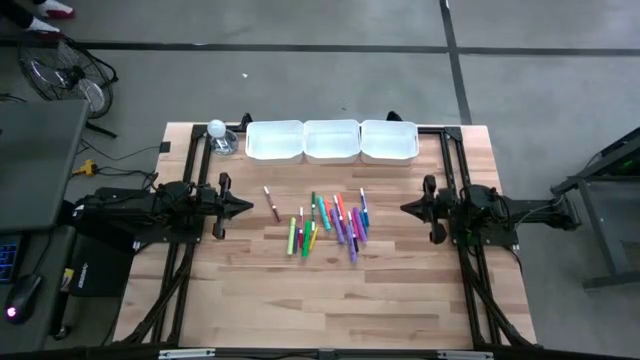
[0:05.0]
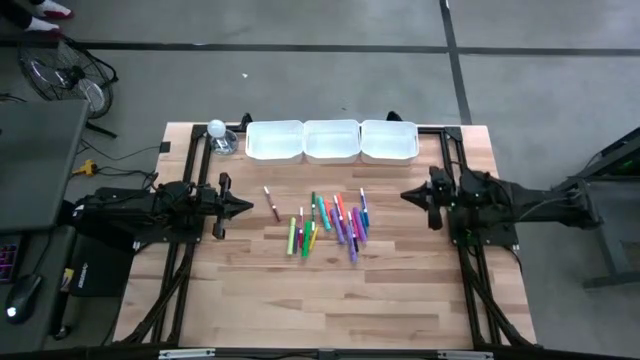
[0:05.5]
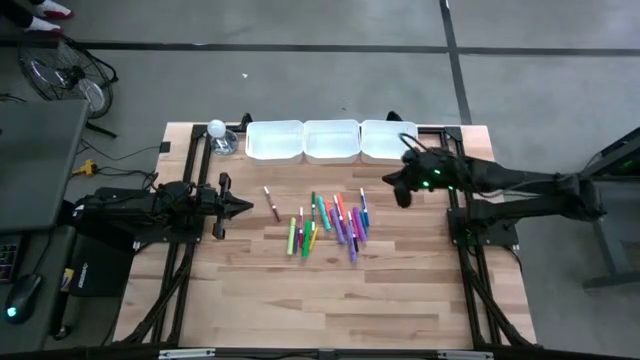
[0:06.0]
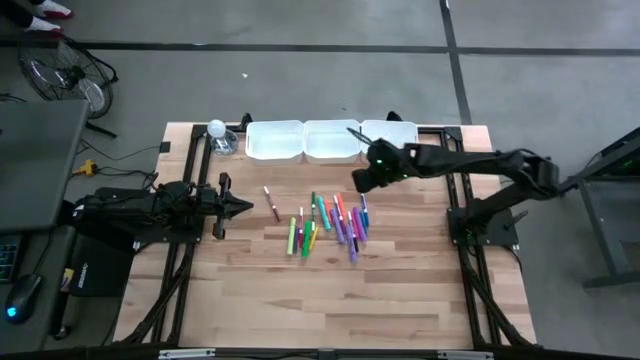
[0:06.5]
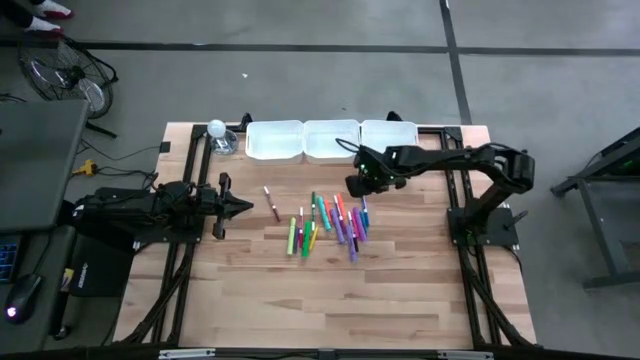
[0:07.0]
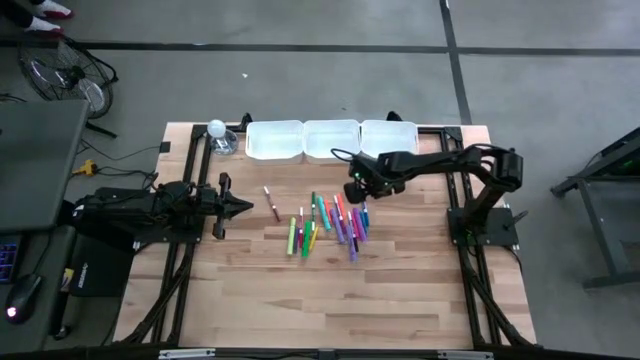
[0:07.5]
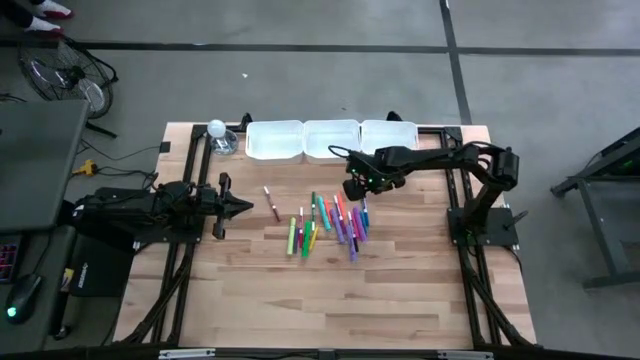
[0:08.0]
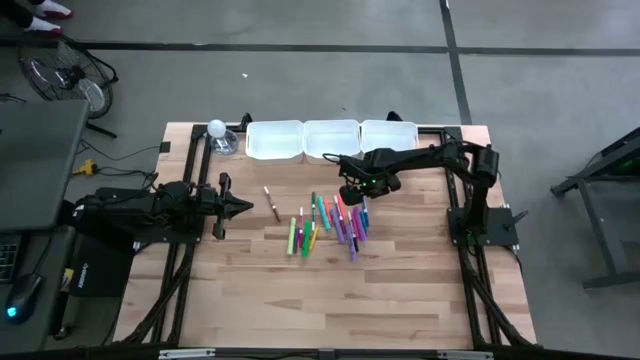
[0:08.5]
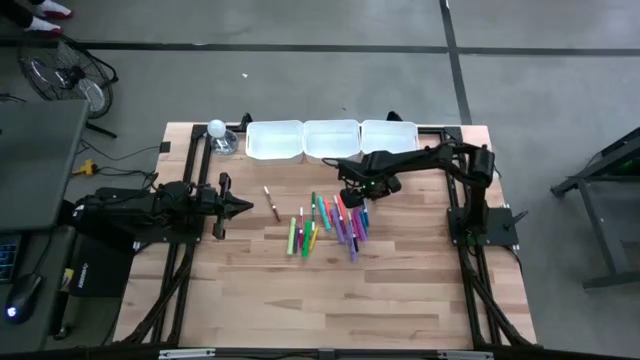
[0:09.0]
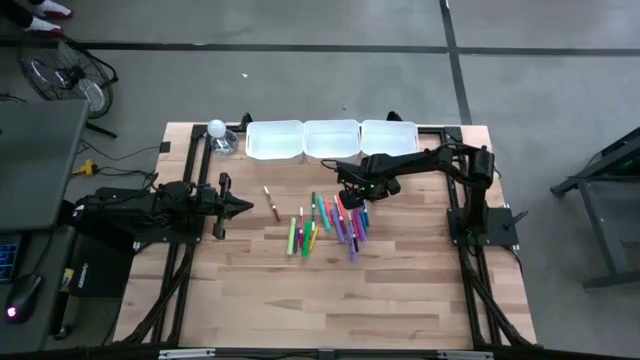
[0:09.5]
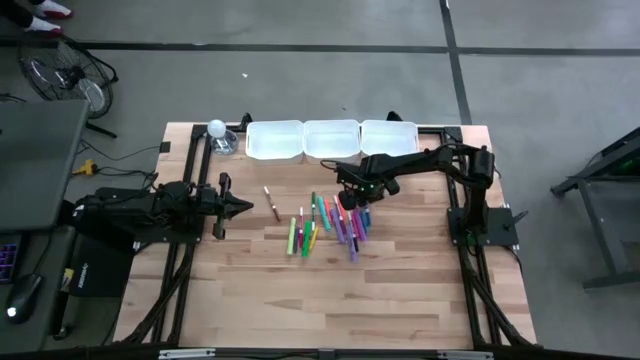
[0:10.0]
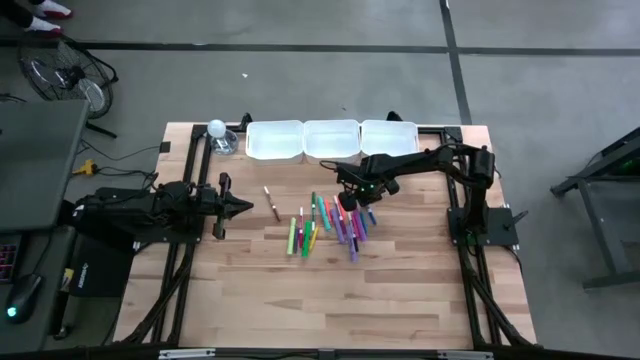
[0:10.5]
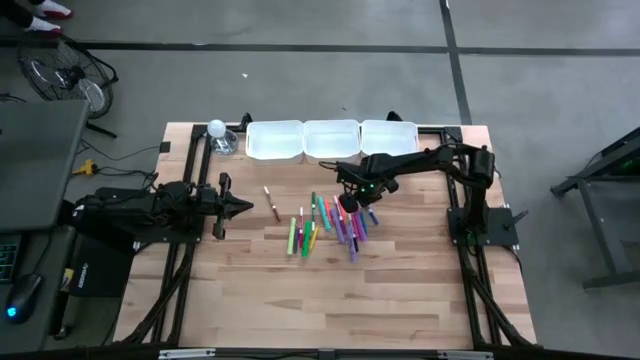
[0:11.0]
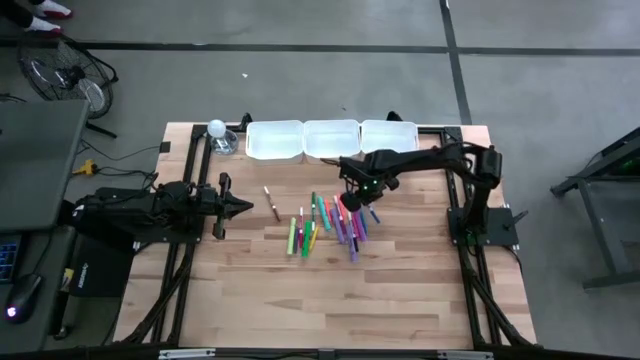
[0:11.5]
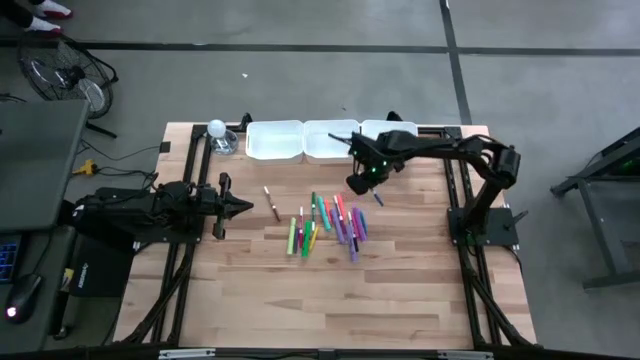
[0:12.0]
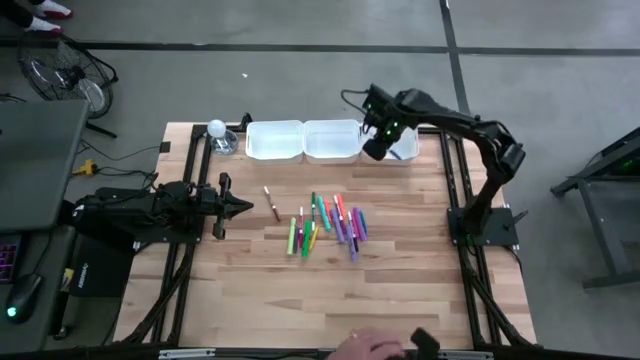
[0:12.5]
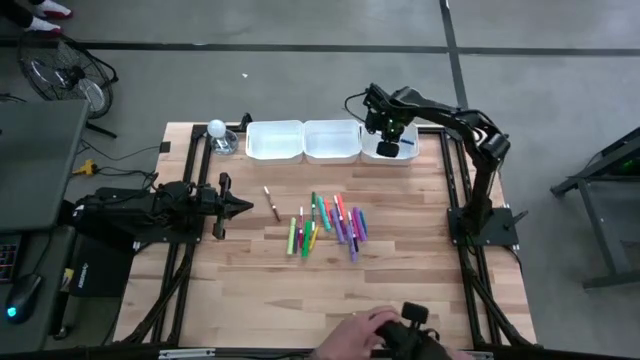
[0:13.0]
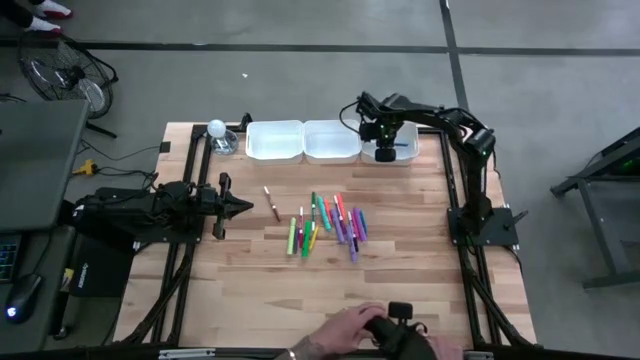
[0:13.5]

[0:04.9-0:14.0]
Task: Pick & Place Markers
Put the blue marker pen into the right white bin

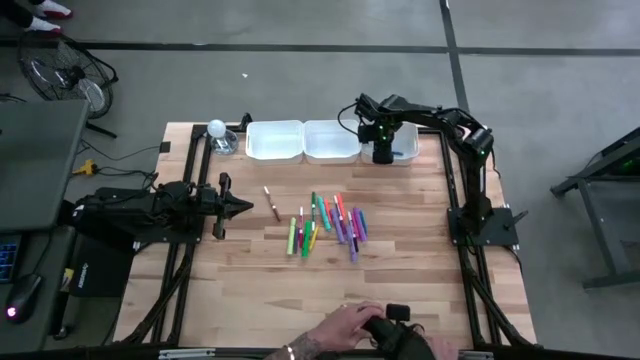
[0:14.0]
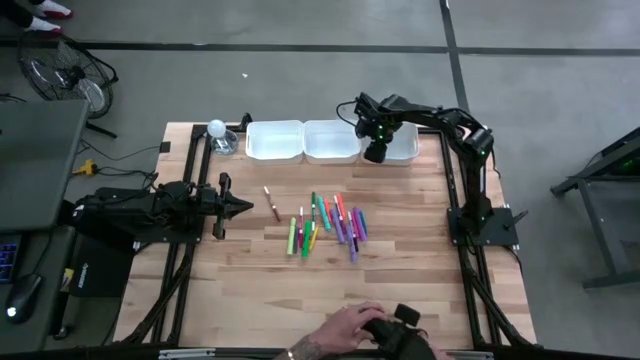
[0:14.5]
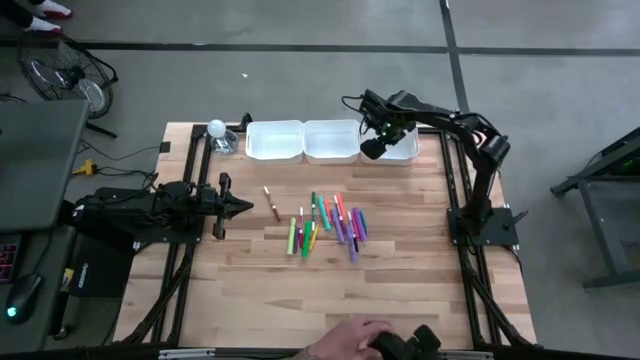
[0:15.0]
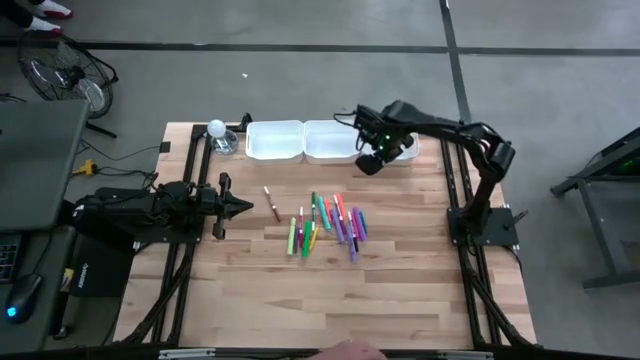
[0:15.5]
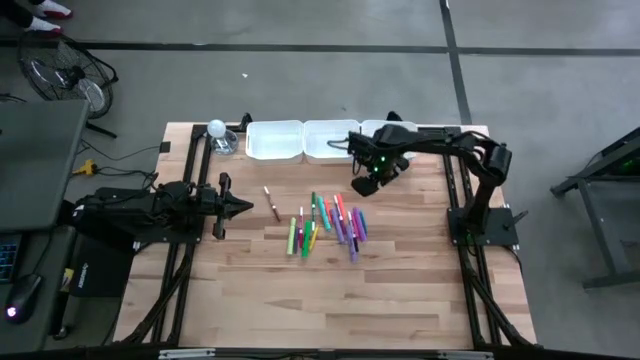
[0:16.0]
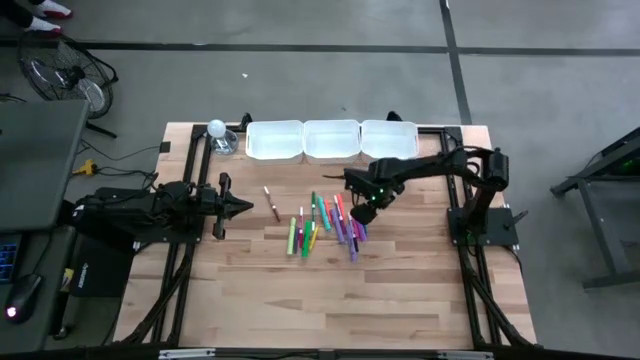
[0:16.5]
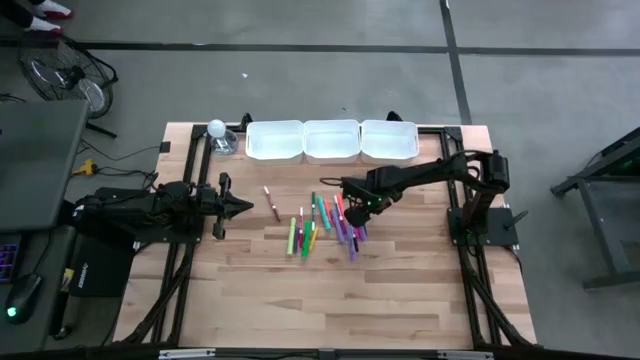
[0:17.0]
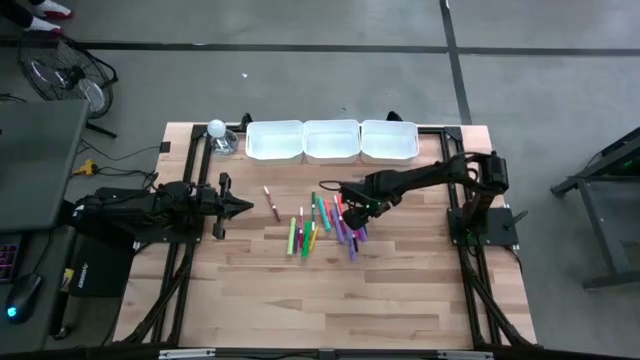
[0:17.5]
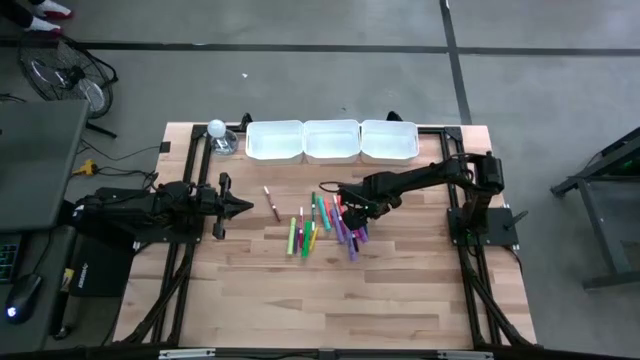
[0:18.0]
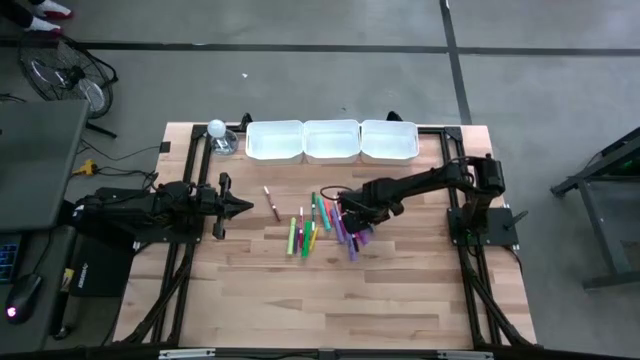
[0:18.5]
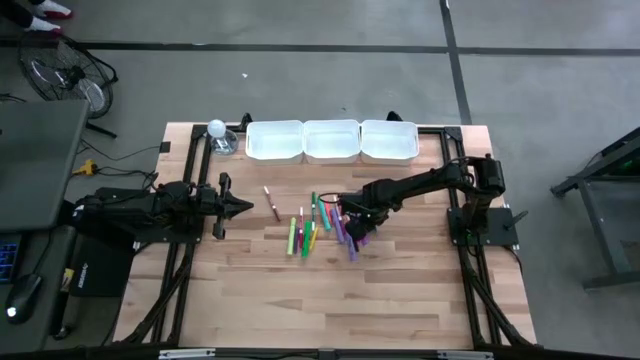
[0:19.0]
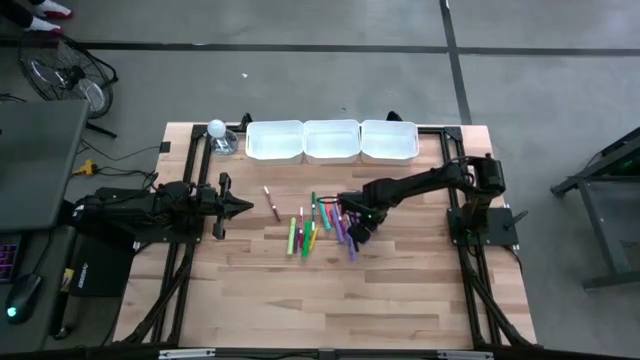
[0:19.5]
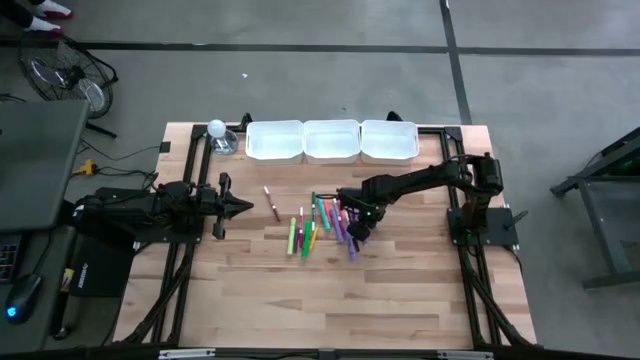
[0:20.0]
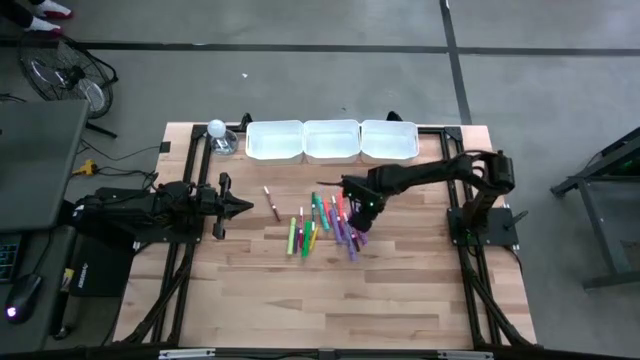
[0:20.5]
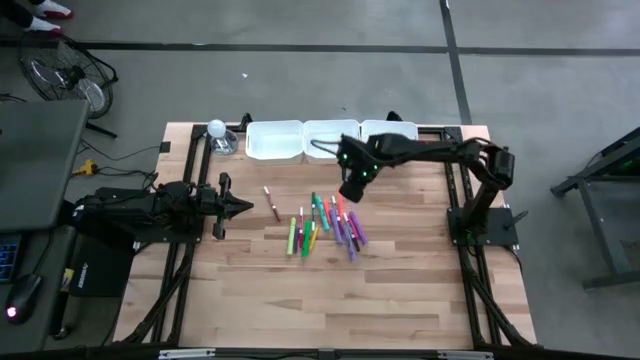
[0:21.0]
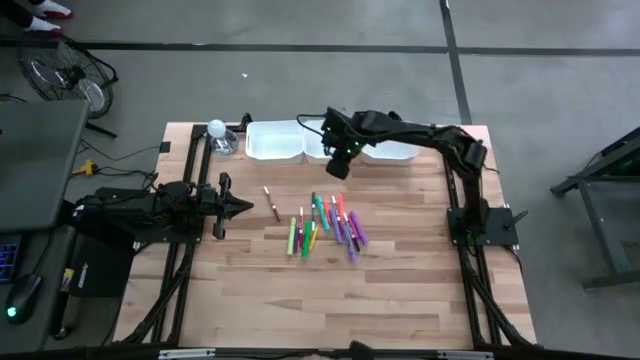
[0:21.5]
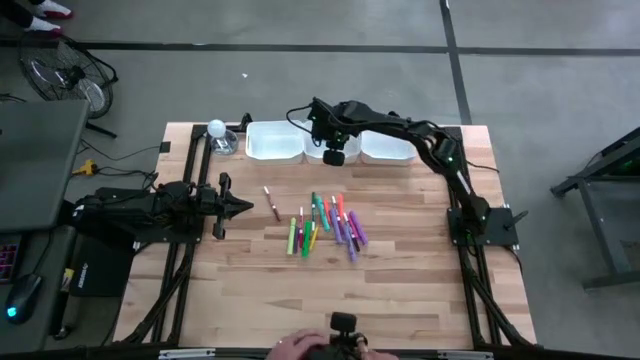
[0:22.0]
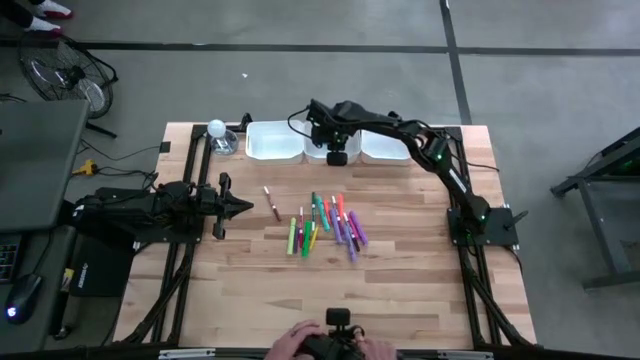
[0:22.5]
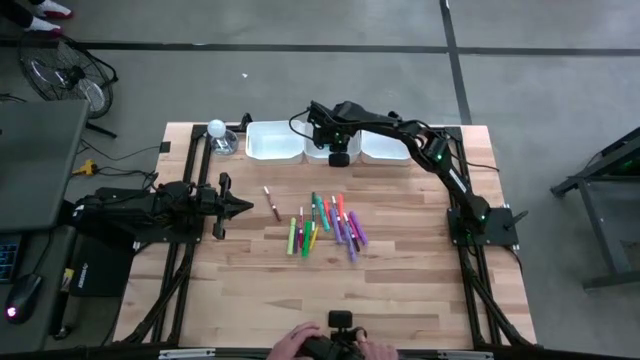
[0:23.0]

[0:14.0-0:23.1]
Put the blue pen into the middle white bin
